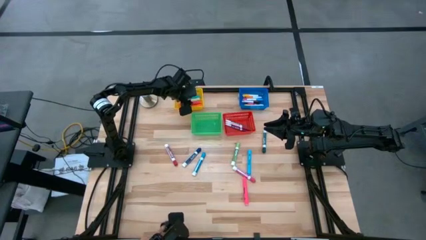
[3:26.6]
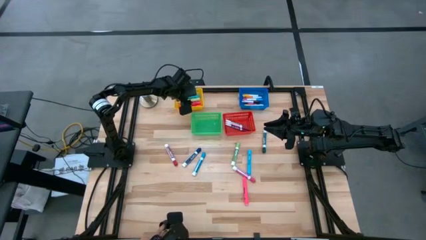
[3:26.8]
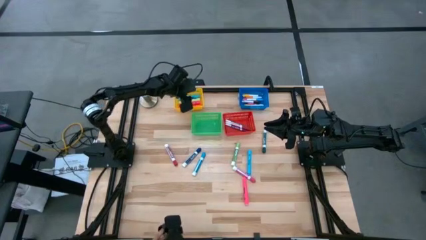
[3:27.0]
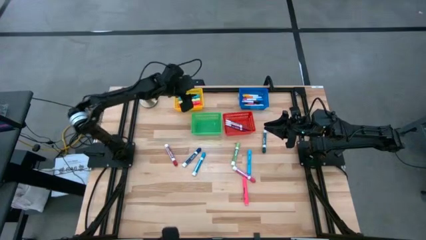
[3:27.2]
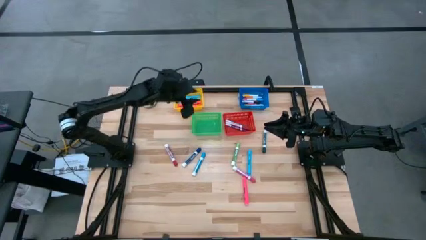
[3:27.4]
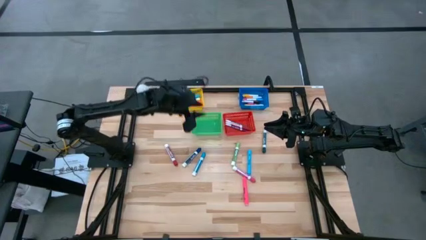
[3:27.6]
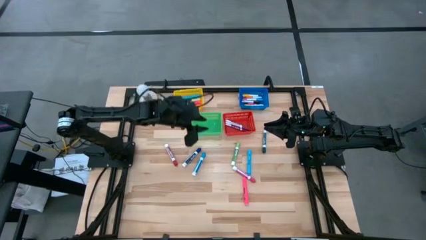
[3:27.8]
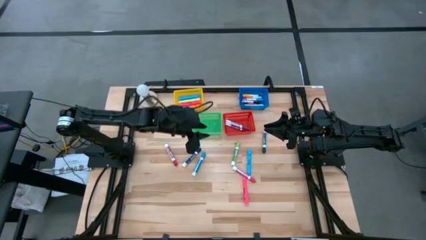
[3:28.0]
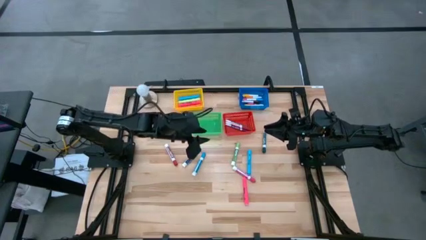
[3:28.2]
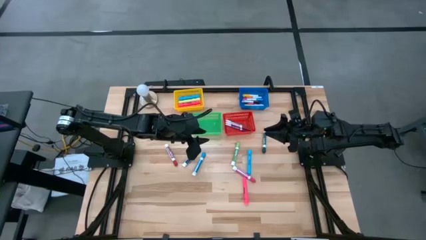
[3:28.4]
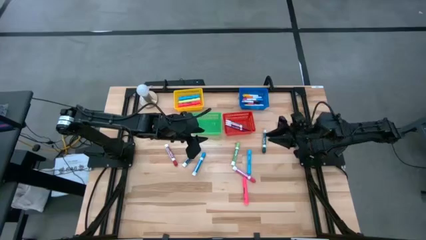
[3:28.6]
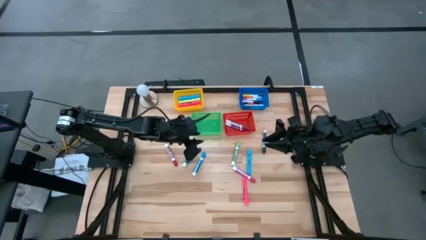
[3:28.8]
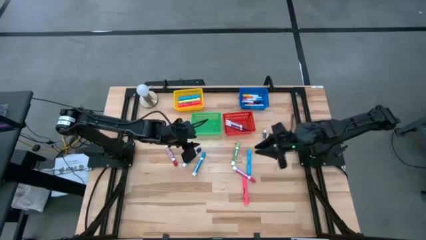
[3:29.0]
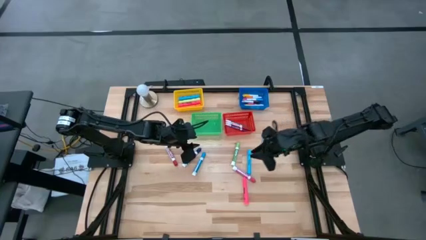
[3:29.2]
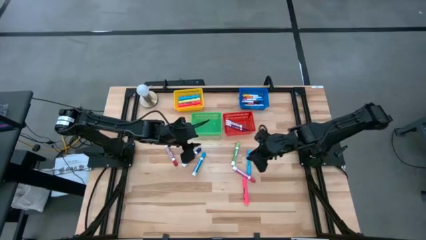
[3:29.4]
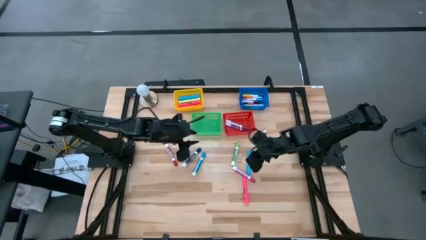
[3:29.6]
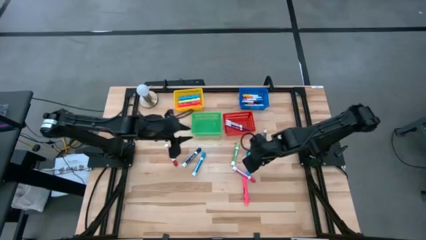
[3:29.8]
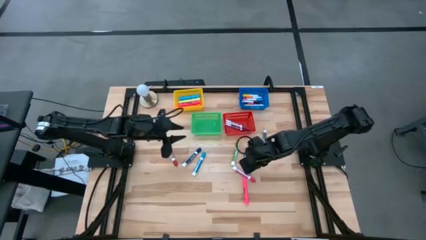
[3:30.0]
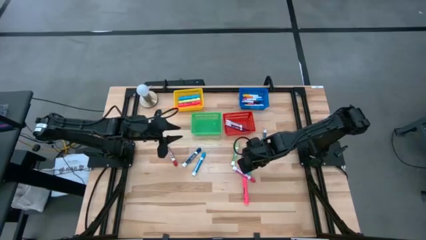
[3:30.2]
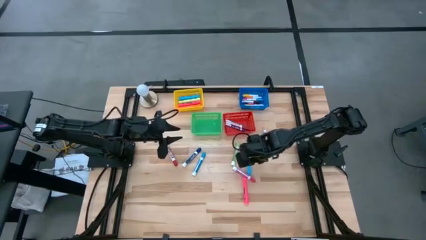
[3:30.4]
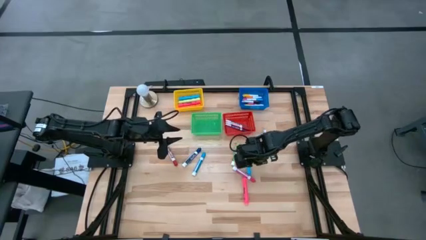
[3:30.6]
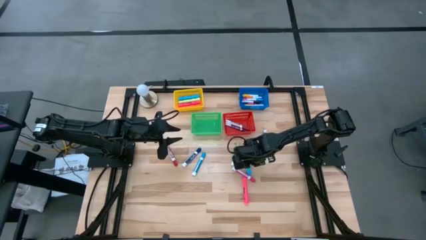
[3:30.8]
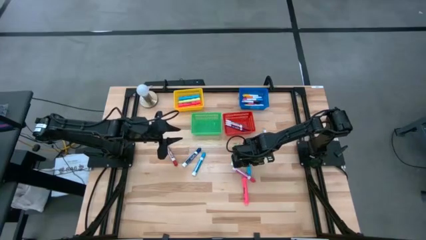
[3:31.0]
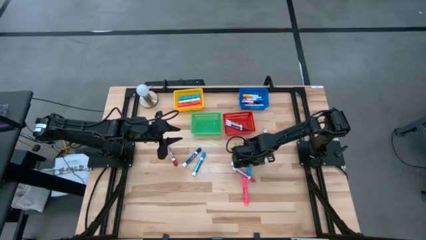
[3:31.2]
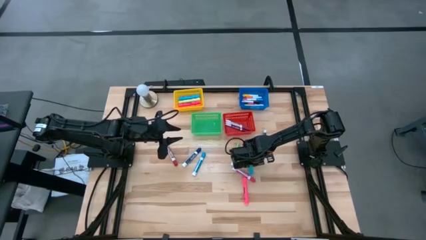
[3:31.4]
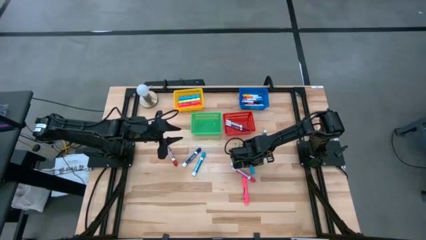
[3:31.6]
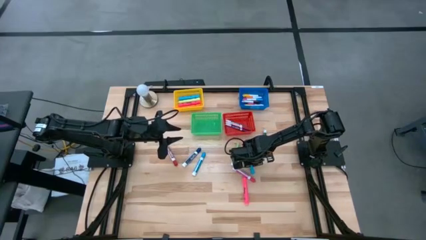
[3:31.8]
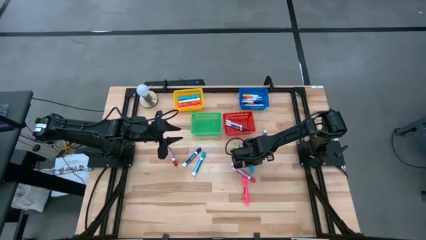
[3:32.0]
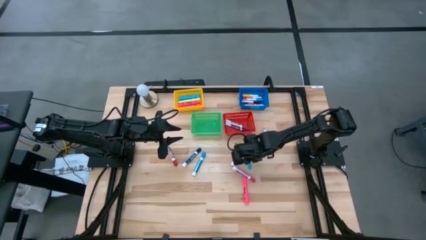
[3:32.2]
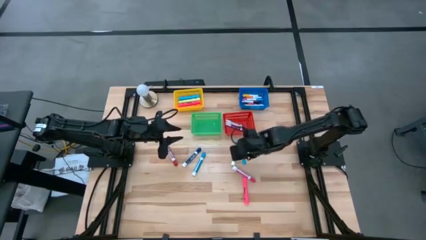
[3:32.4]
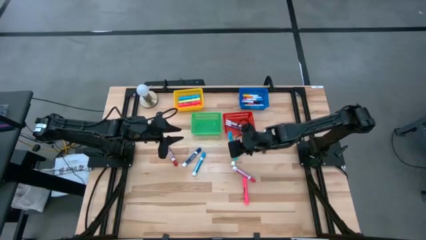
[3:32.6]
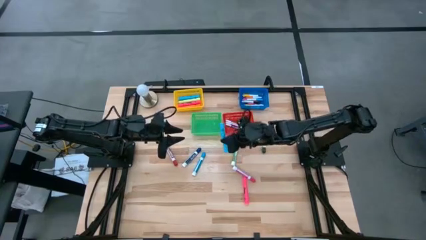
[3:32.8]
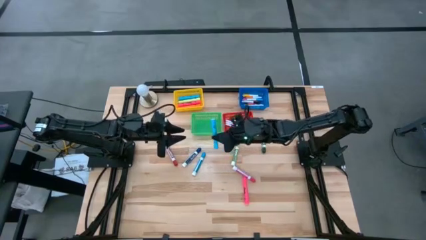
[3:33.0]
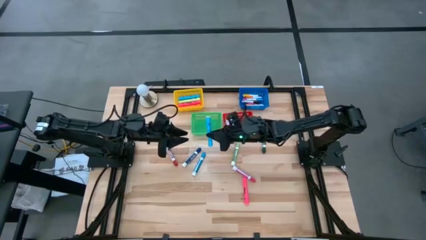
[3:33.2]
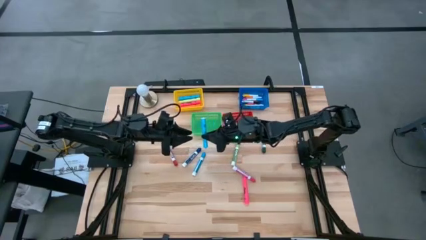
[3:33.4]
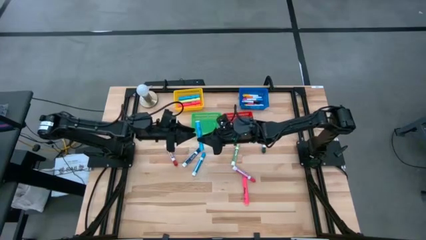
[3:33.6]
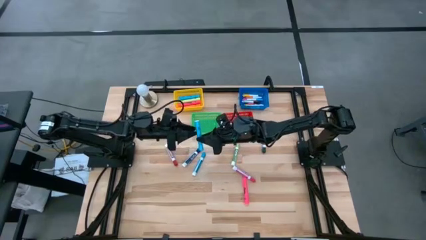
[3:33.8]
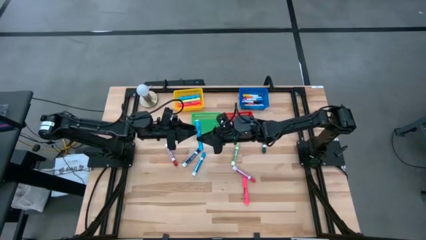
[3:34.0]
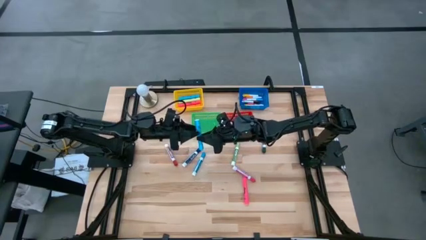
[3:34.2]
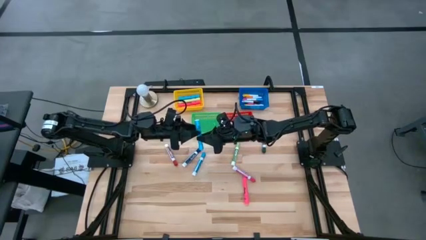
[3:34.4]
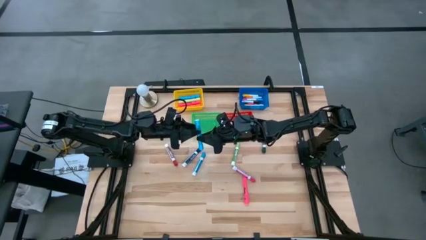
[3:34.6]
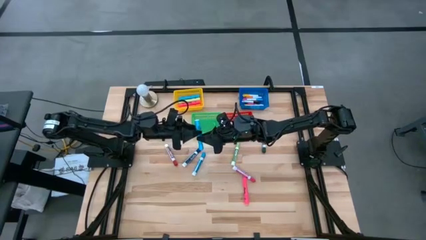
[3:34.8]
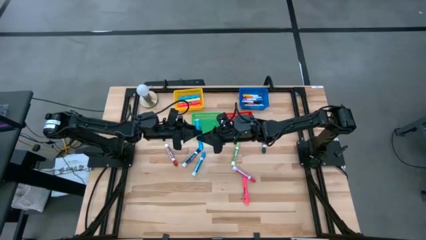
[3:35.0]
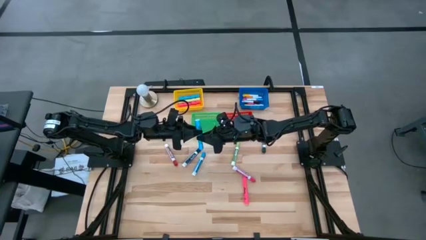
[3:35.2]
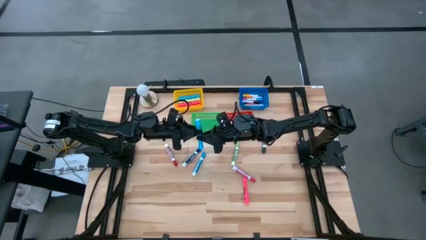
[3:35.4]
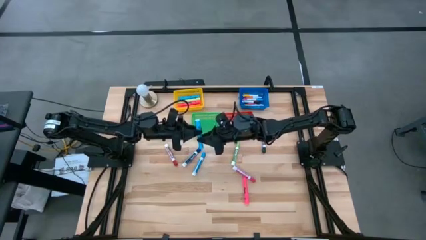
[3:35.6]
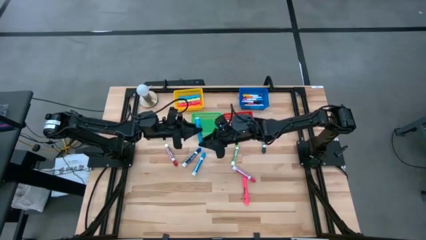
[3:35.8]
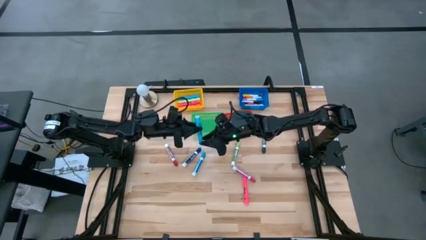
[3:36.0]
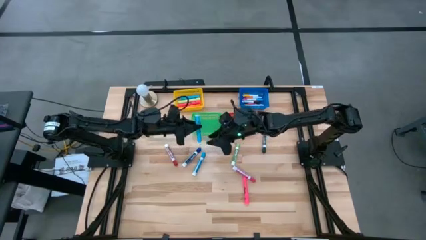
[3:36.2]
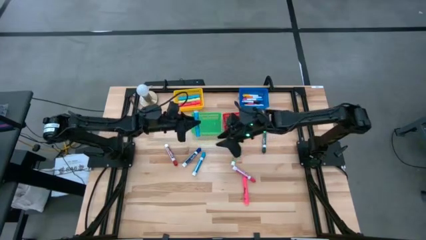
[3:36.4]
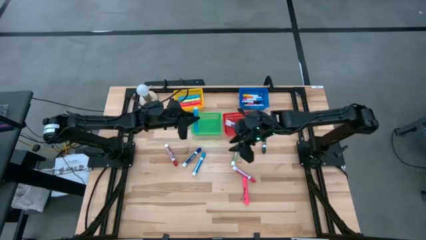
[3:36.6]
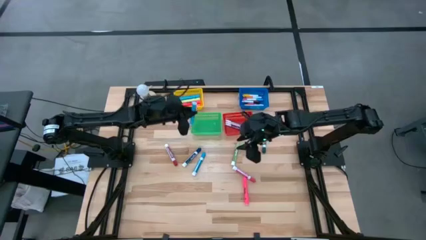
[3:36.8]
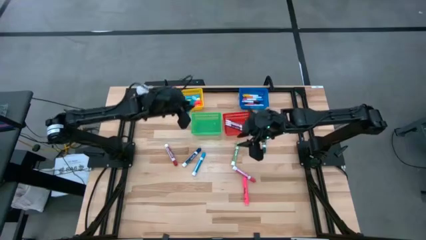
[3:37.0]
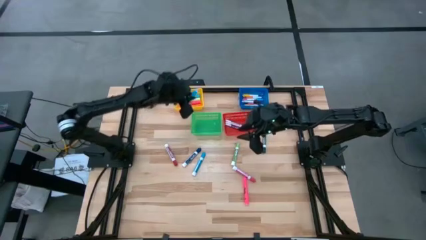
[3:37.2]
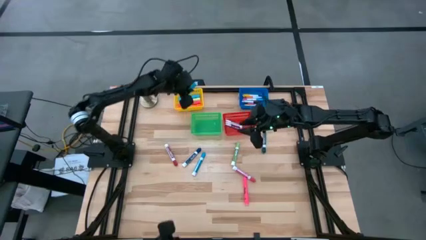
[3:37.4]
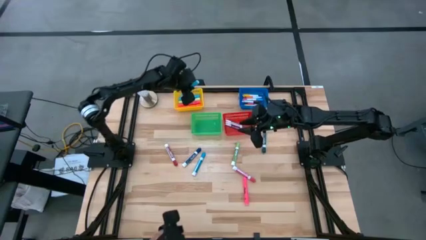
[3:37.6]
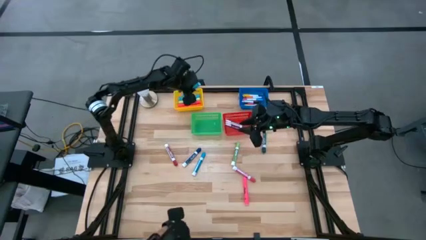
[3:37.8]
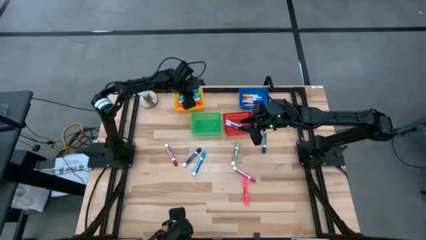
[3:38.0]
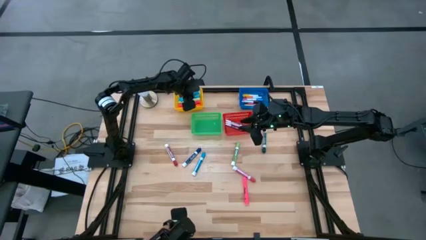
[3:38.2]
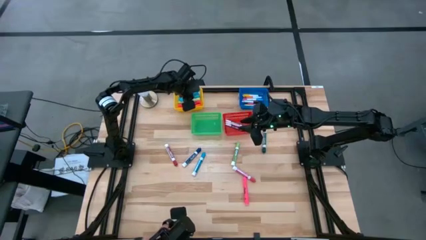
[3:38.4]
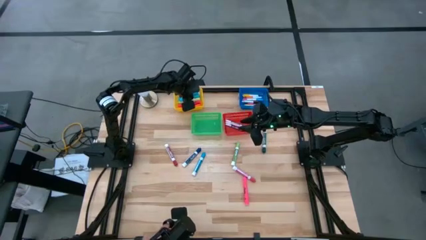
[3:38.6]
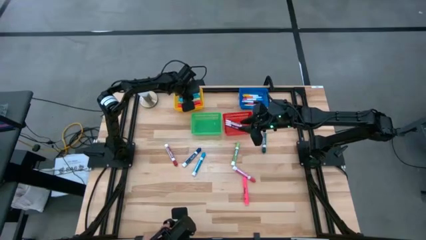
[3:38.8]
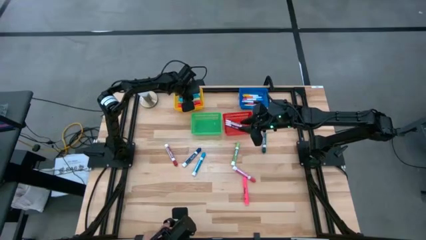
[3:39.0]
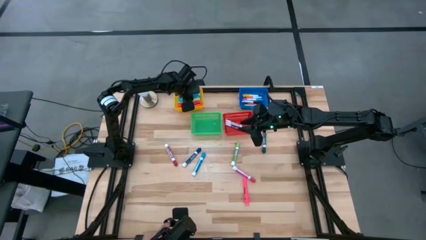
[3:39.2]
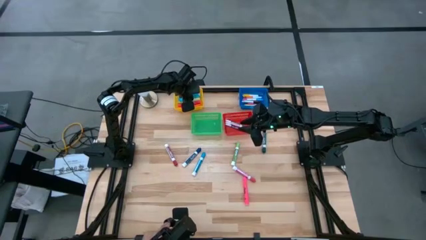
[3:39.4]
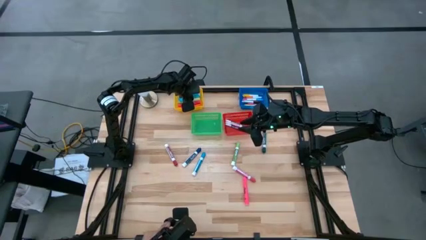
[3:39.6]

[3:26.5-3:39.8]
Task: Pick & Place Markers
Put the blue sharpie into the yellow bin
